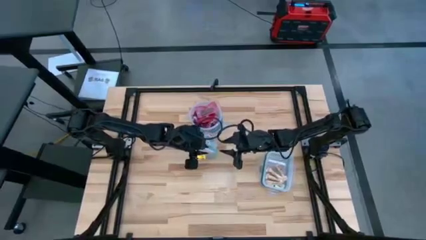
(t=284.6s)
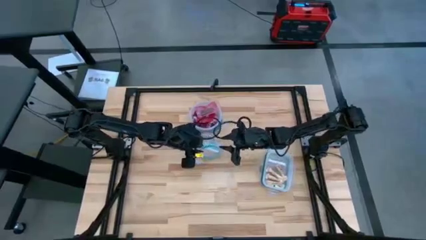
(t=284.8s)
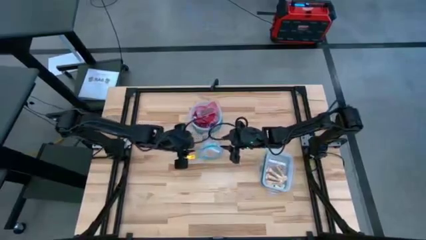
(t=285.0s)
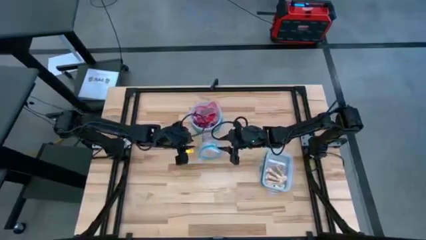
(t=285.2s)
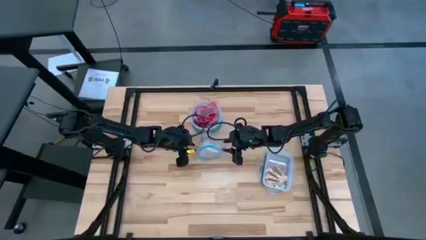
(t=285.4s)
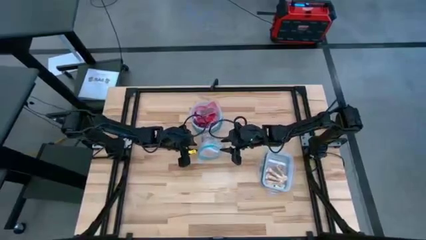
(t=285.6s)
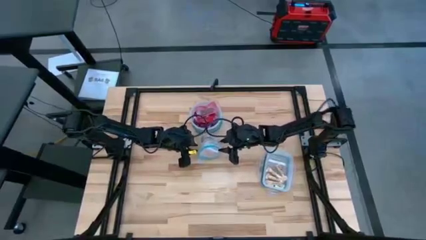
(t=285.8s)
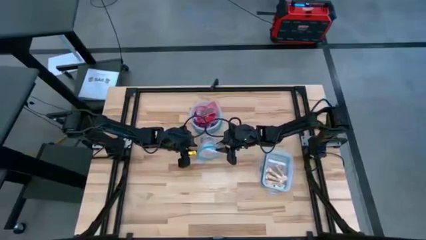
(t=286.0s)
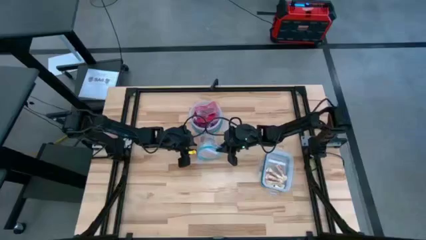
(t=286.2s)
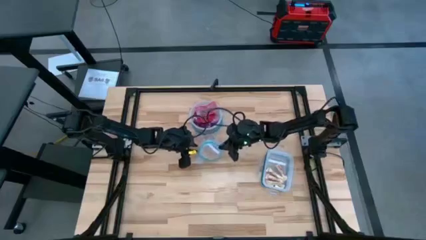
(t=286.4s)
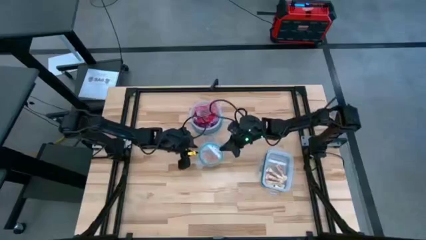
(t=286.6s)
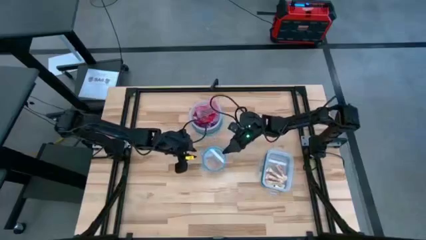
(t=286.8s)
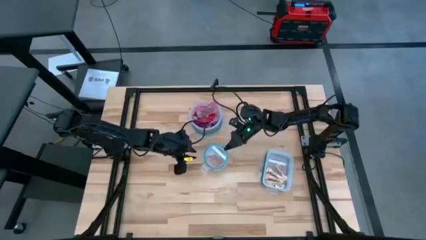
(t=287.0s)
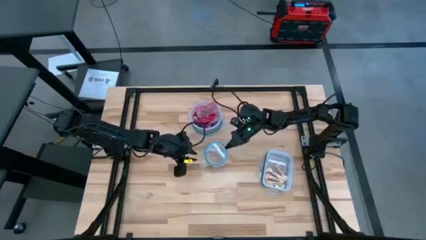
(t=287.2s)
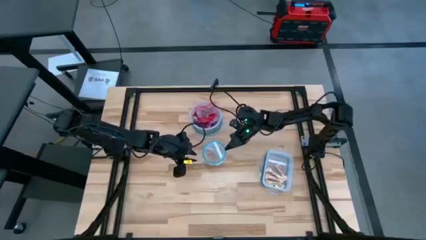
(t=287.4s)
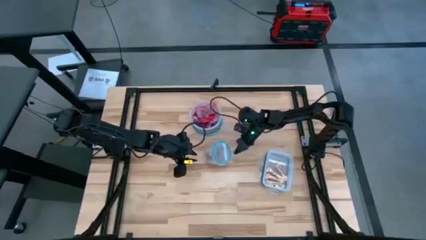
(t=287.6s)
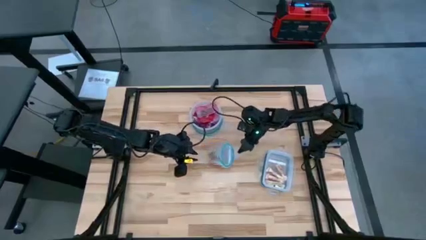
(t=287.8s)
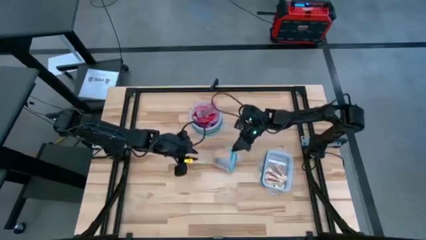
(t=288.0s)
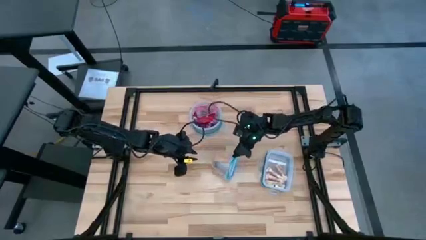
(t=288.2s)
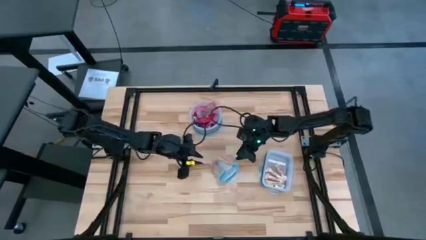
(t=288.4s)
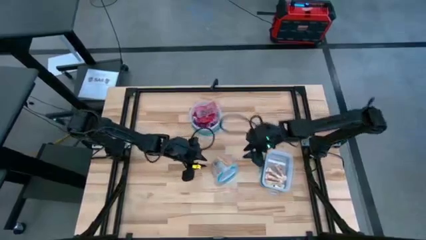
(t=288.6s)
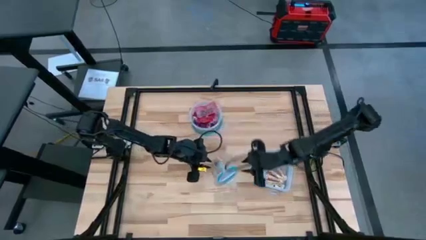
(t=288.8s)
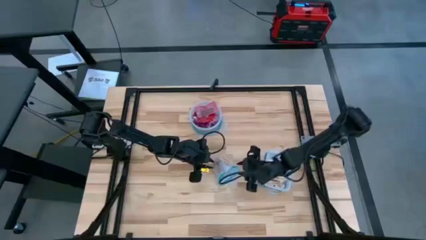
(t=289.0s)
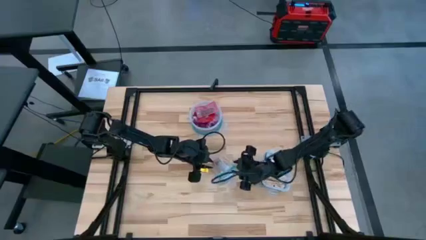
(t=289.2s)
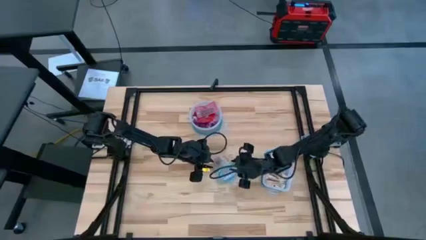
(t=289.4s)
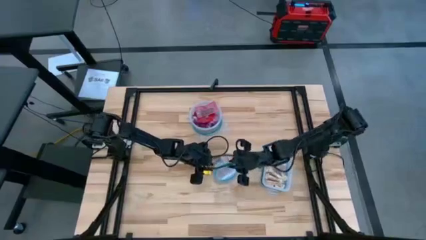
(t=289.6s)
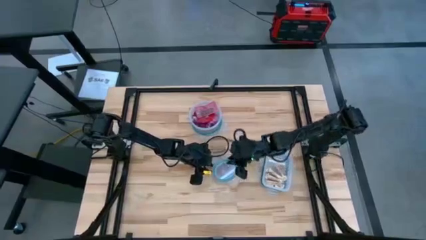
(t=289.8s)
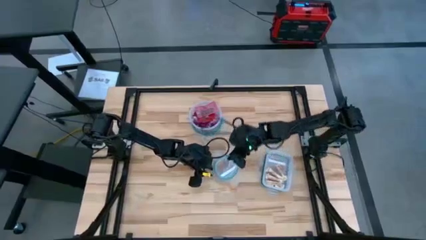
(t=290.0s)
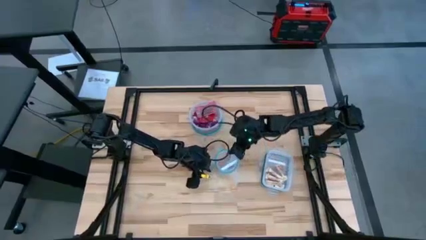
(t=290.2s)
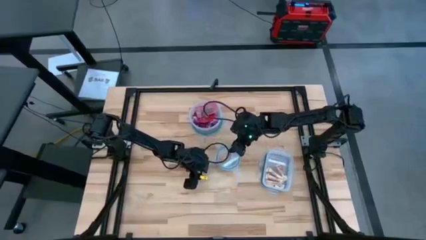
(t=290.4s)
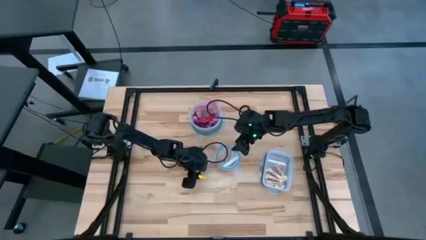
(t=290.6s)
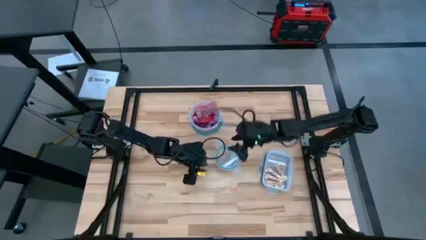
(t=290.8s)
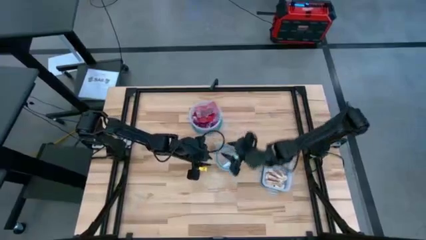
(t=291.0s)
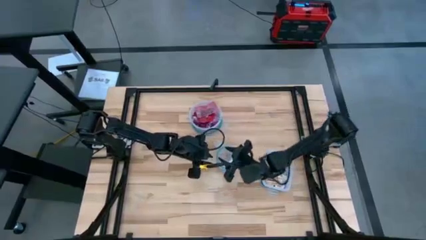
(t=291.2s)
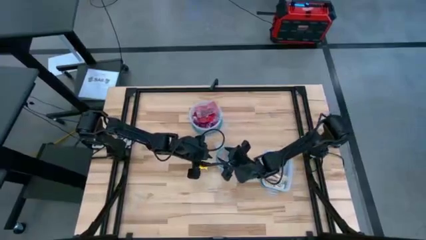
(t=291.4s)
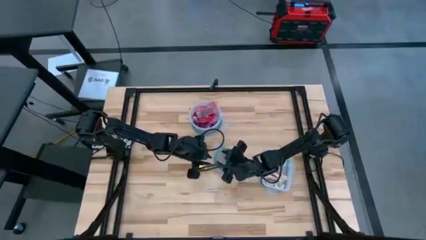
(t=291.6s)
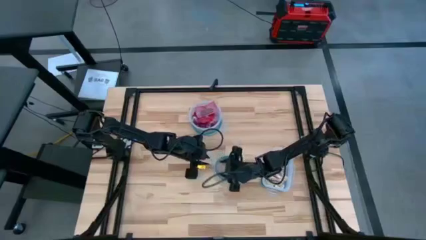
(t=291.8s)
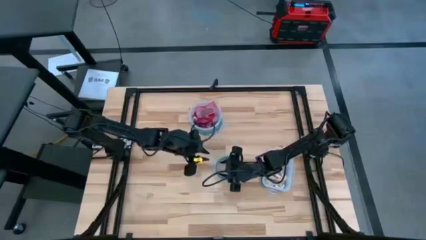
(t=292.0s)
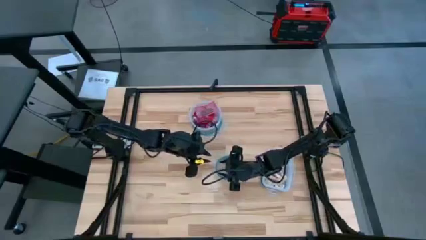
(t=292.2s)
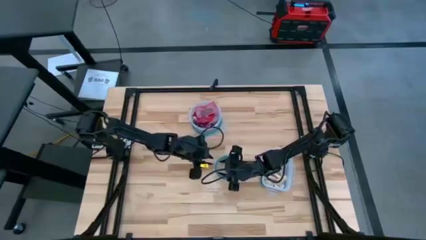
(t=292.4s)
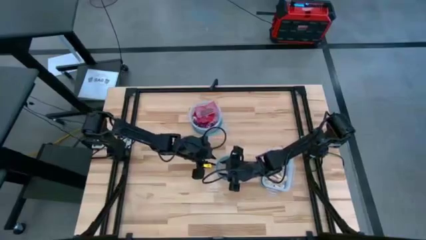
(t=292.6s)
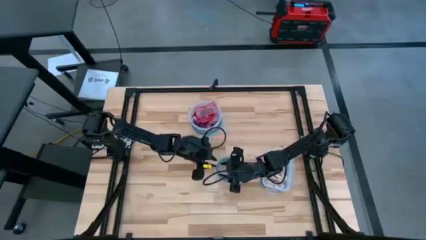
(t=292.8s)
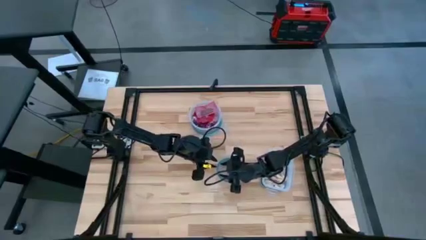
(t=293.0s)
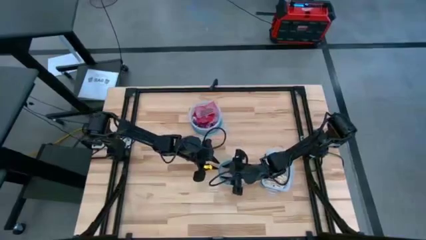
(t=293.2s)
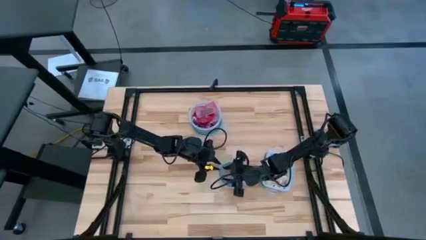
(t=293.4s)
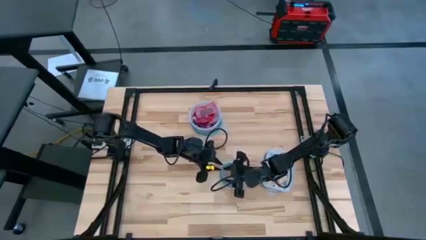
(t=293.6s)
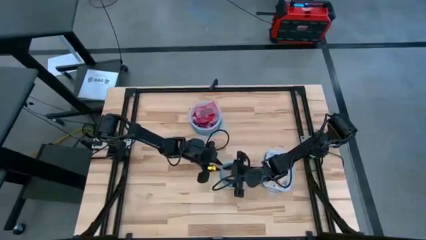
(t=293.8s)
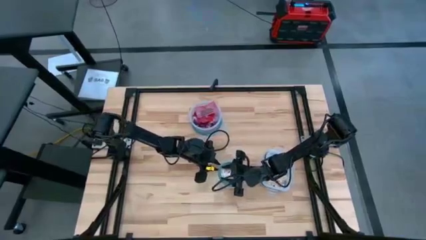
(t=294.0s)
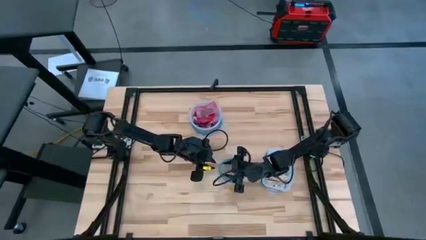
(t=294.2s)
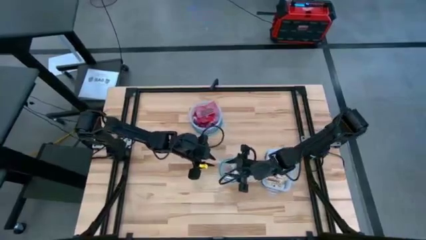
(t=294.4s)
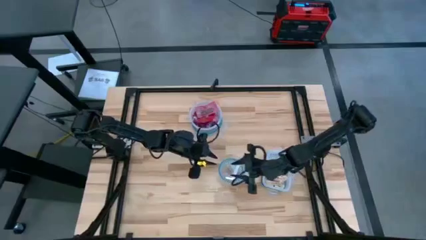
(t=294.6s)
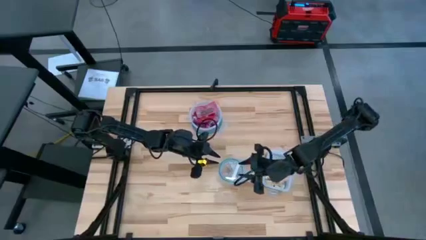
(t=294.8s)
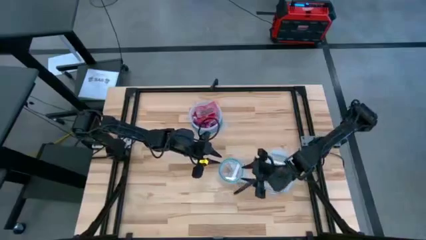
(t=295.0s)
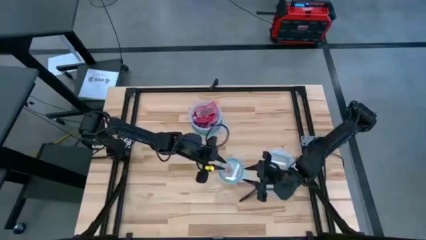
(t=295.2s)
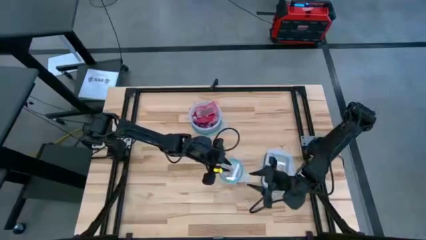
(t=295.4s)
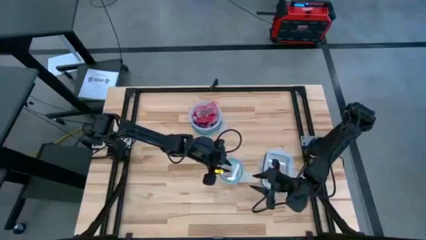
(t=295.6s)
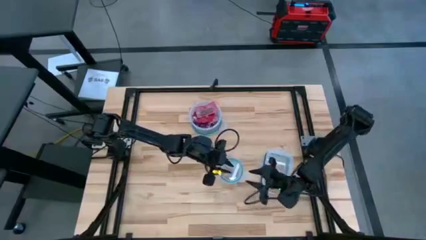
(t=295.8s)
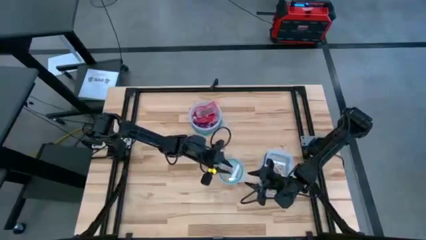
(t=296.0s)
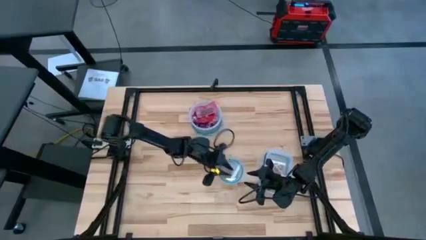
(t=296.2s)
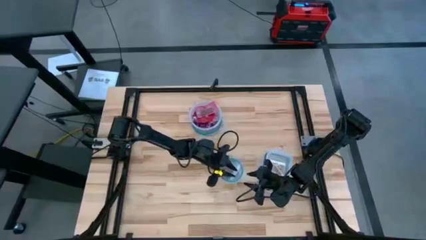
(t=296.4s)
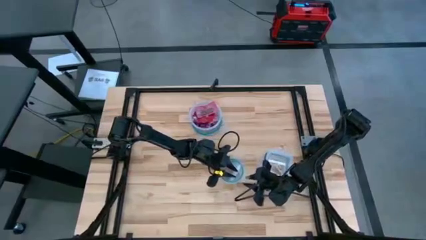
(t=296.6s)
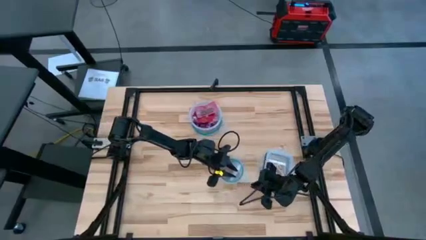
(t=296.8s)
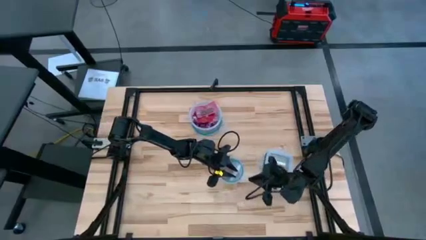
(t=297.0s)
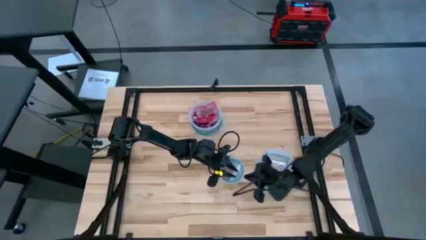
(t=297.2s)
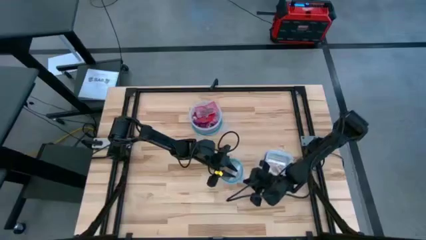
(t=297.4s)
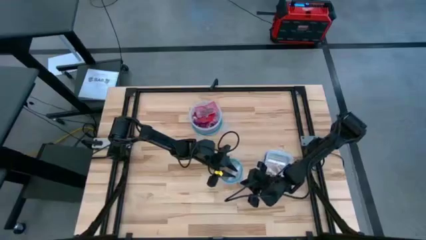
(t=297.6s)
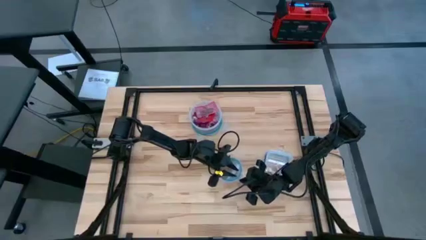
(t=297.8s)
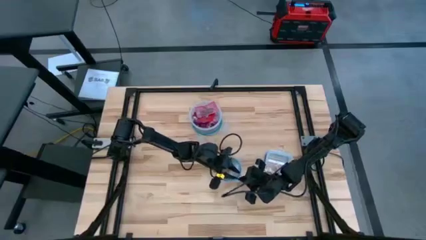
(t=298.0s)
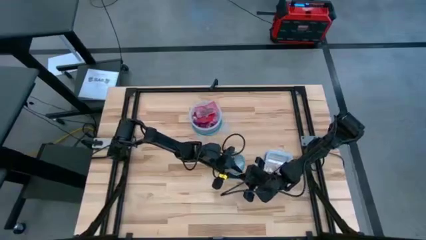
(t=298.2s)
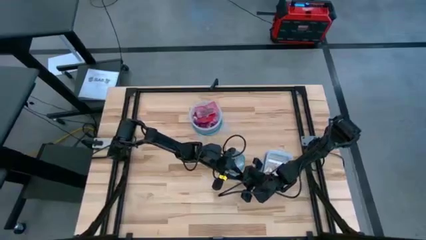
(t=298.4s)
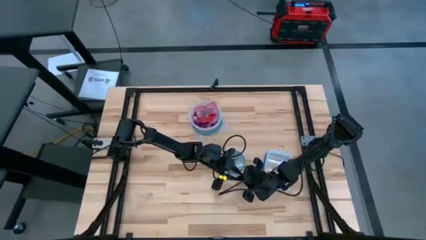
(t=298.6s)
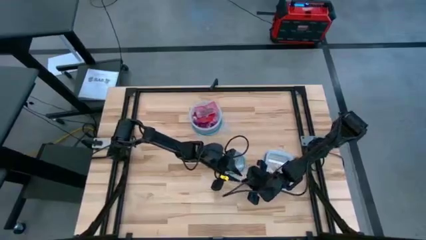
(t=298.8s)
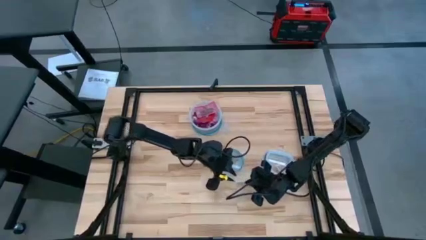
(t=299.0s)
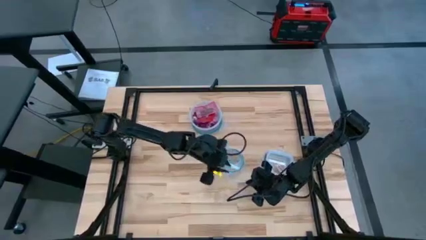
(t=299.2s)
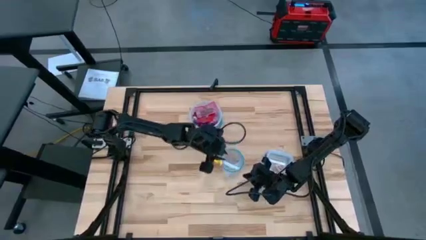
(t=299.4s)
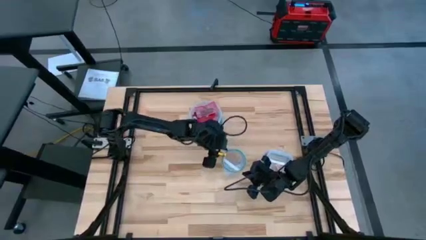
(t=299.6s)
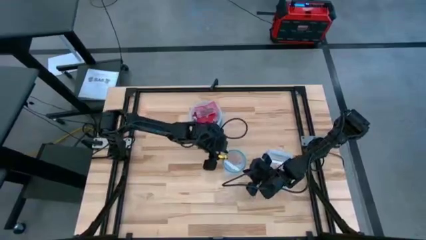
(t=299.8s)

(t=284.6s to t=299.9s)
Task: Sort candy
Close the small circular transparent bin
